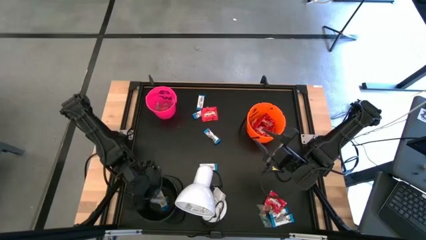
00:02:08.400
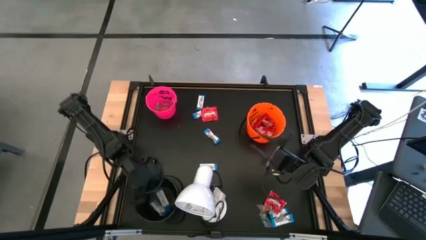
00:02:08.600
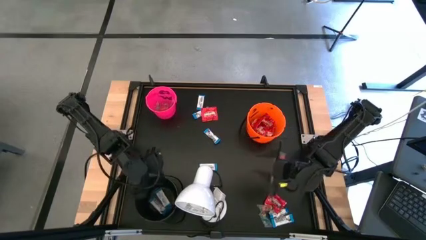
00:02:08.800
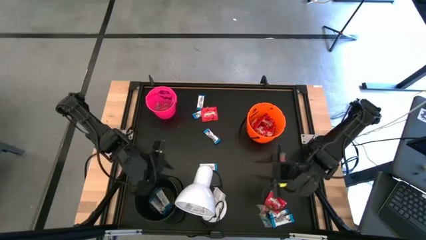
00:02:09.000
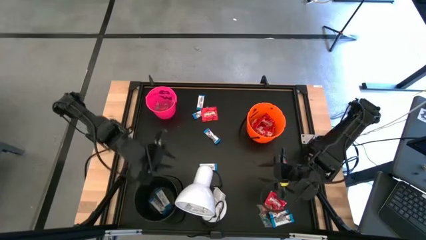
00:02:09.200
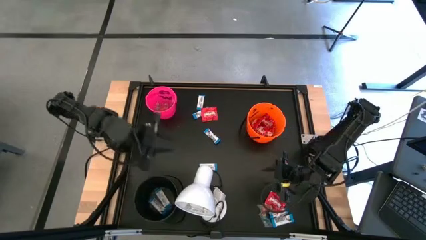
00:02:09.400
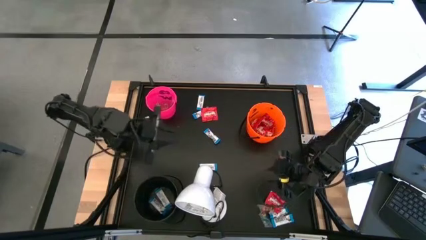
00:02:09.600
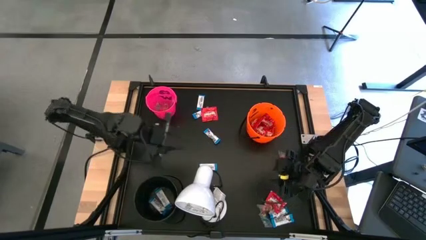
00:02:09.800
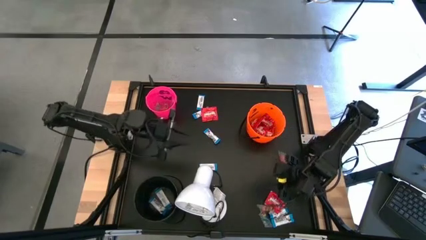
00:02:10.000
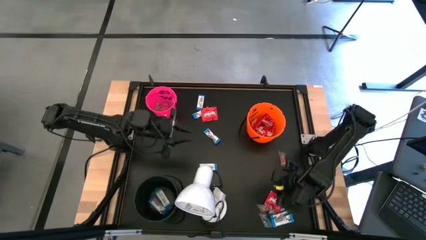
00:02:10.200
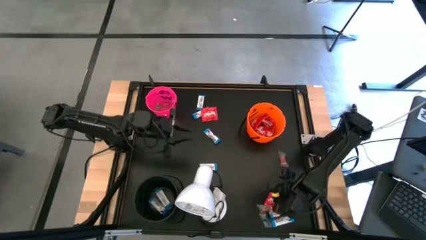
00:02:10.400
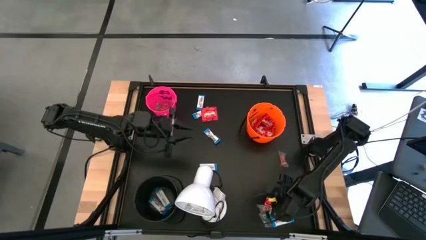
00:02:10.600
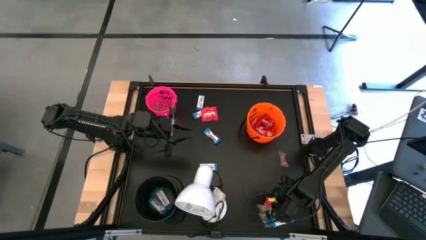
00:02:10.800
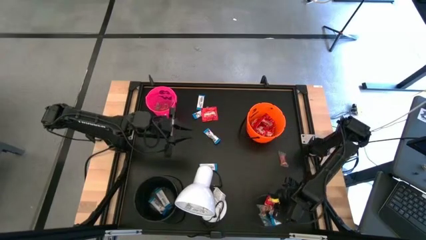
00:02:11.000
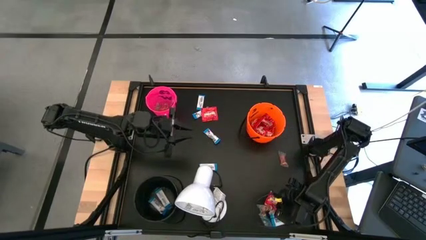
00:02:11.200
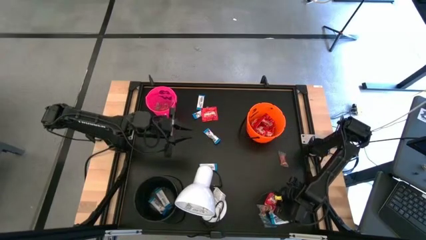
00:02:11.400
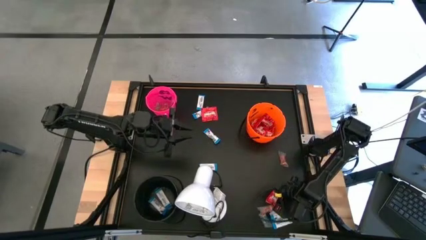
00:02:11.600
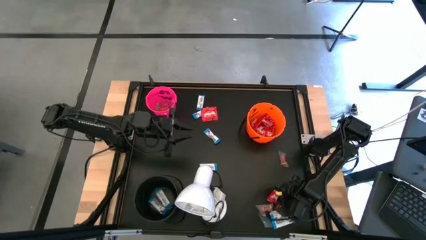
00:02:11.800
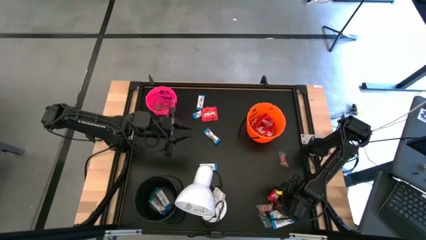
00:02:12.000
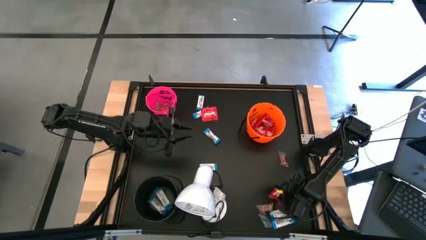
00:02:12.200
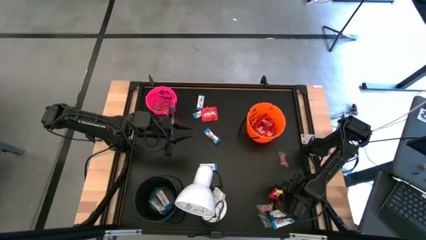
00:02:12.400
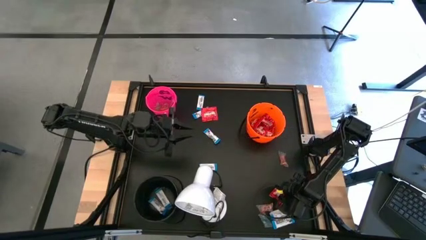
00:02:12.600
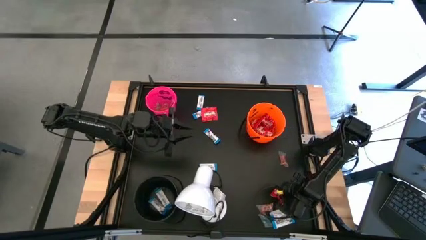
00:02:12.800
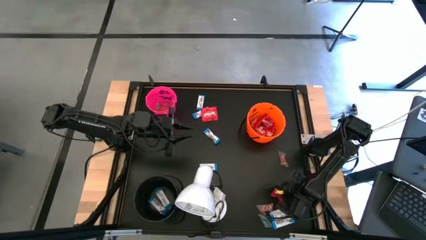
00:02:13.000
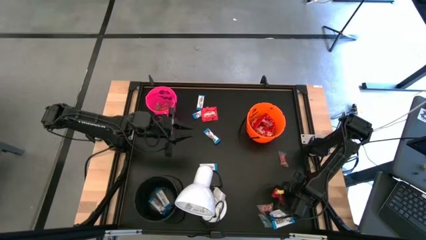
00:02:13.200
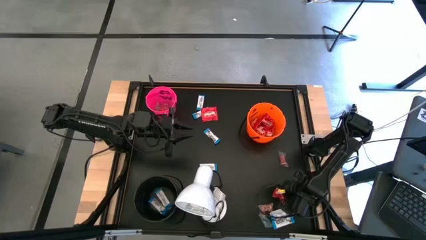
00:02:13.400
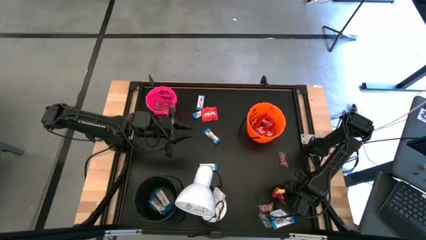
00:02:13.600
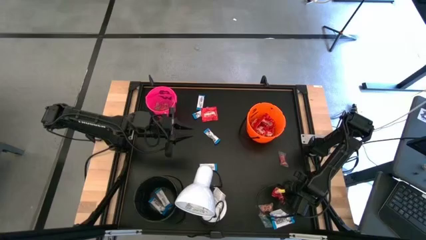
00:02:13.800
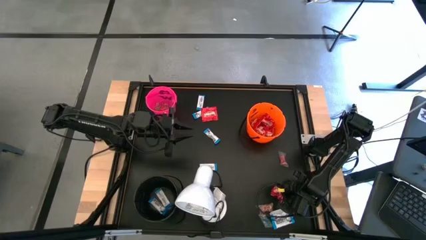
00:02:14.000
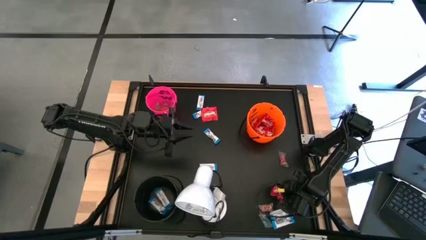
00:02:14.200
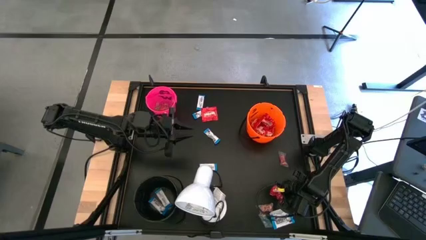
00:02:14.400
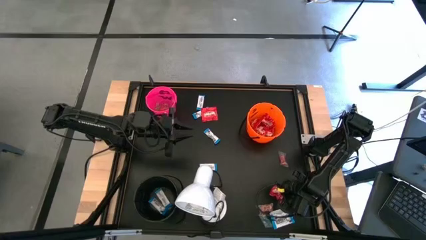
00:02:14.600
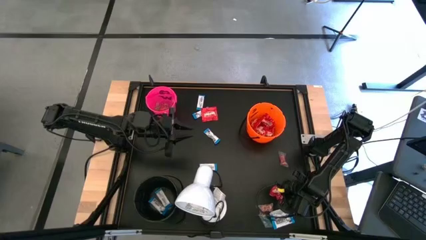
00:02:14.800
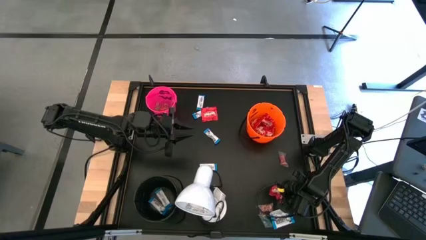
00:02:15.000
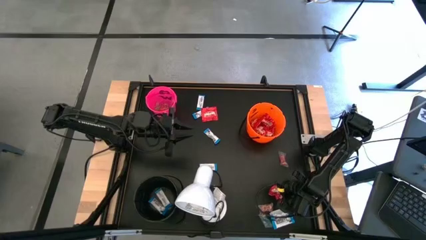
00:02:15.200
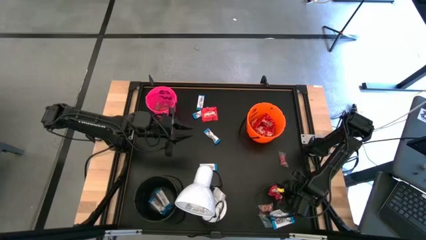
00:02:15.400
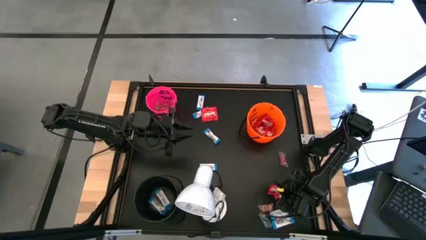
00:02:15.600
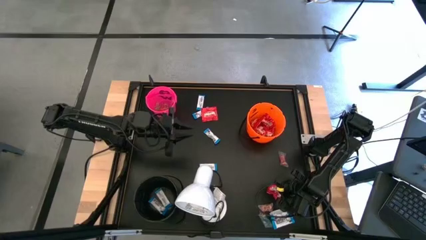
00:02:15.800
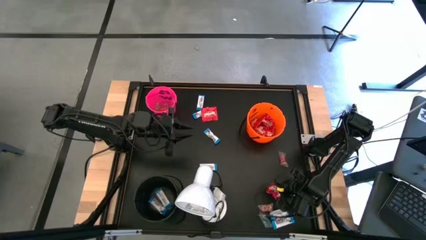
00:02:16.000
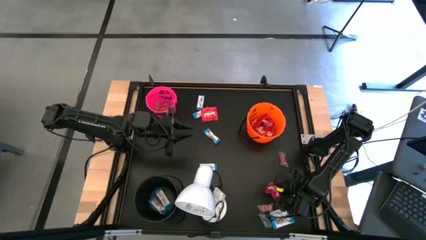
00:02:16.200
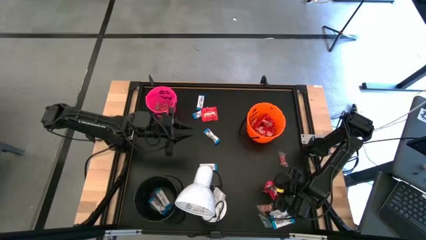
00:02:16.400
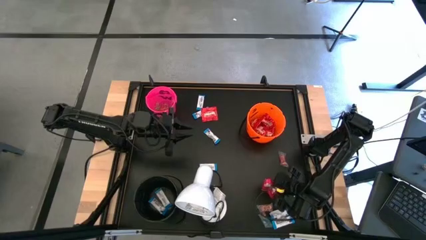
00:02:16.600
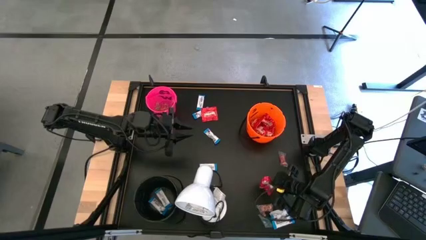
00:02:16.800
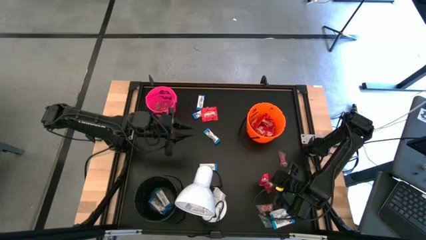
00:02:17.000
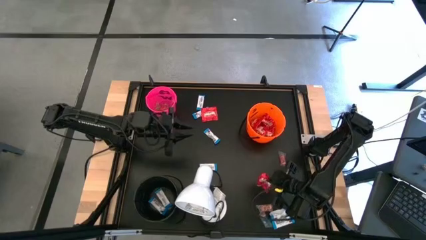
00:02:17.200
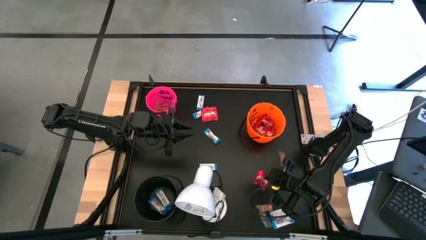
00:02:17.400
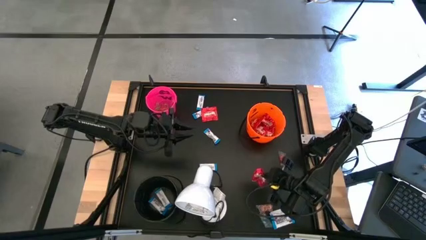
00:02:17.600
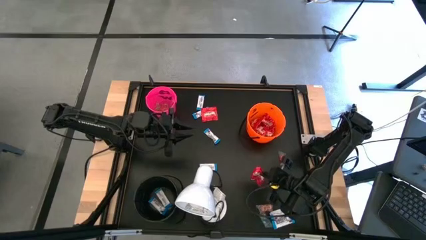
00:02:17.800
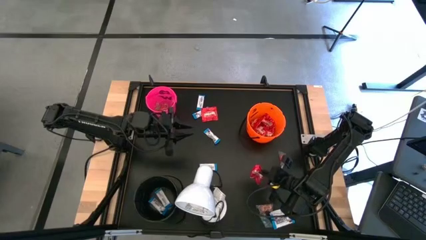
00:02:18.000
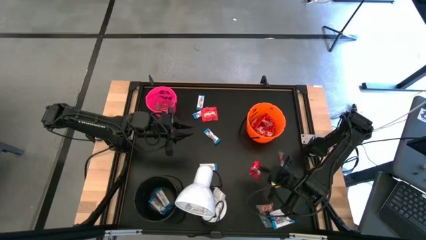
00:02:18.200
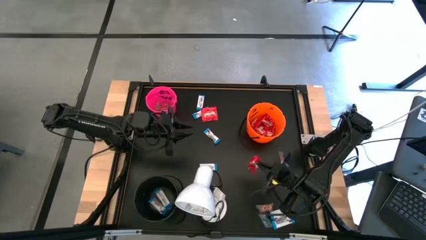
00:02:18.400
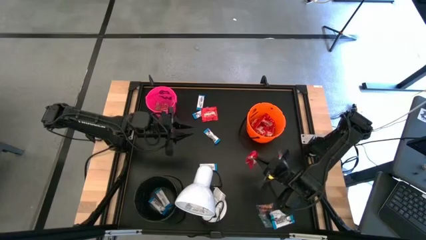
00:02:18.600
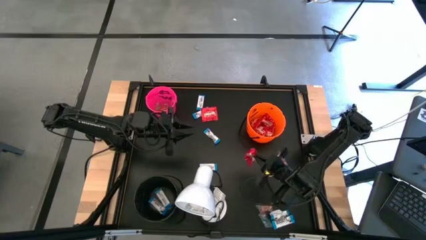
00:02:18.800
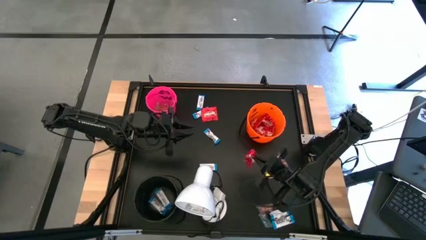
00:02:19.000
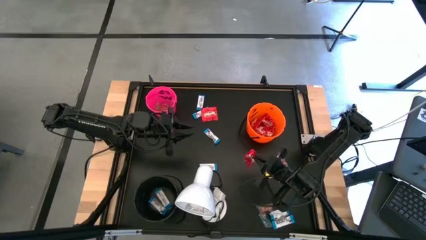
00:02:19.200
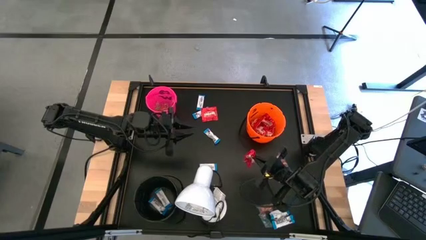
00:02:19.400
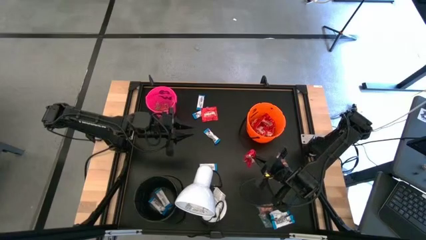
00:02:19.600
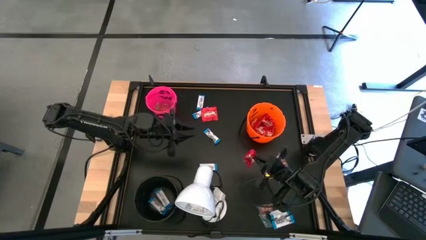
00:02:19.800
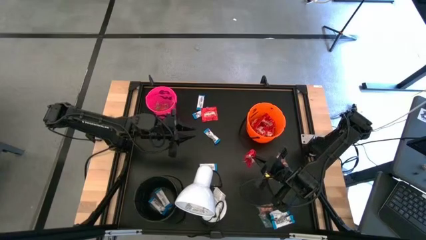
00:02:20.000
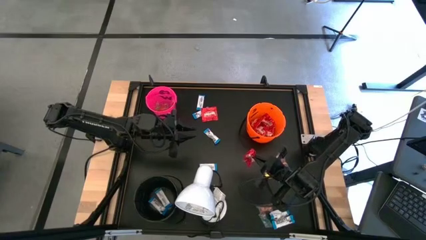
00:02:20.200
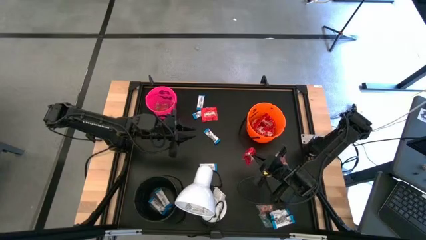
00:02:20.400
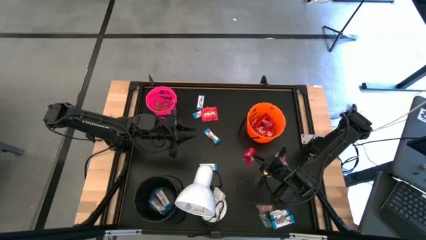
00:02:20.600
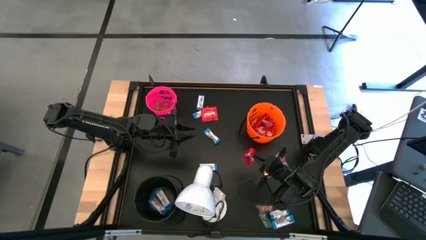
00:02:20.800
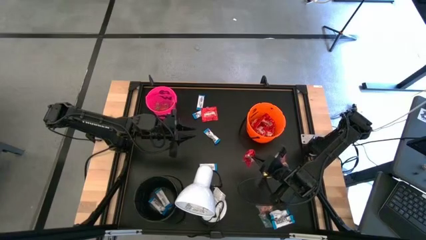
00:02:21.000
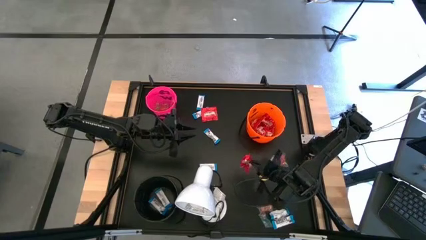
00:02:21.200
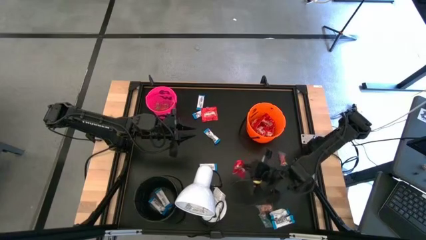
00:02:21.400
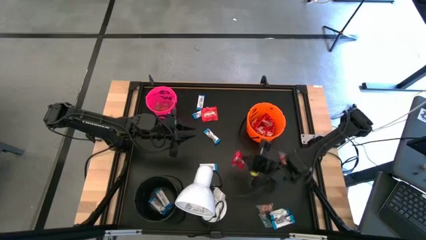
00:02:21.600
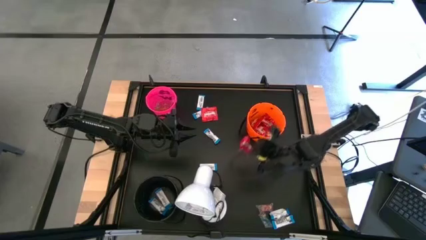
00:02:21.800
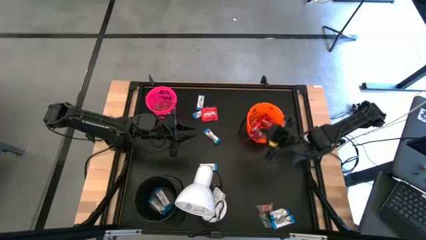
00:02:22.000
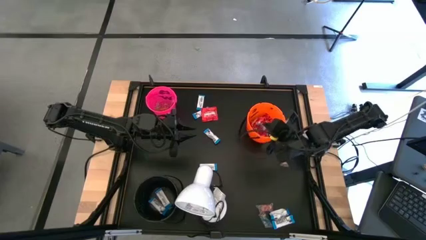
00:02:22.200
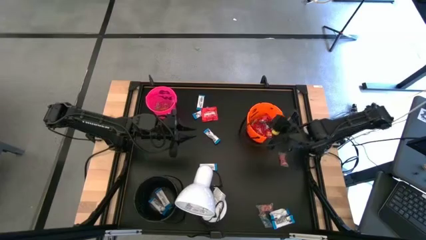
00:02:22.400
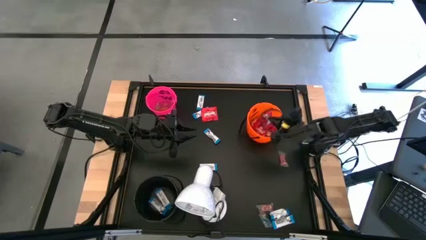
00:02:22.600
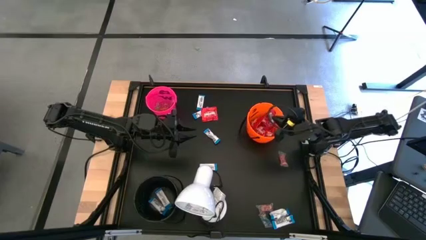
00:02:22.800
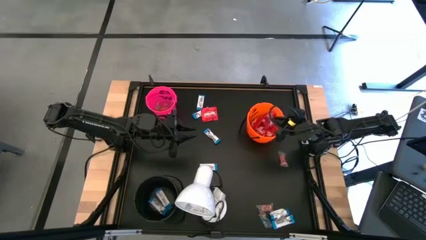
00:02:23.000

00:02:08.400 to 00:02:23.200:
Task: Sort candy
Put the red candy into the orange bucket
